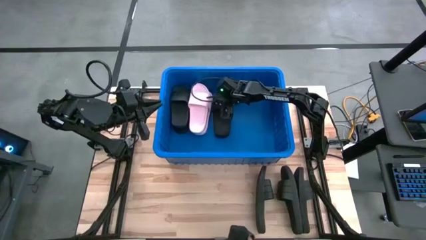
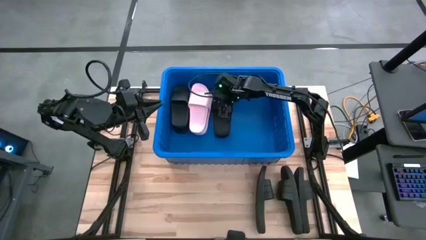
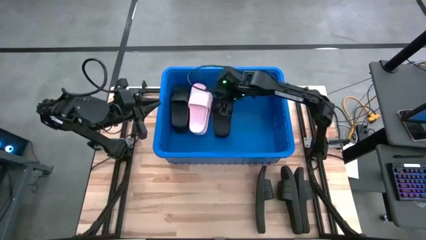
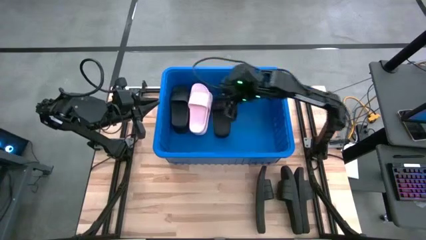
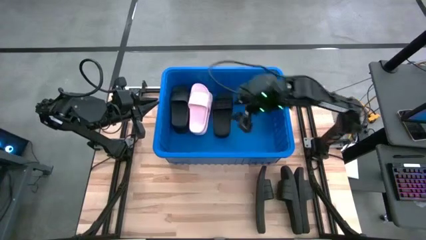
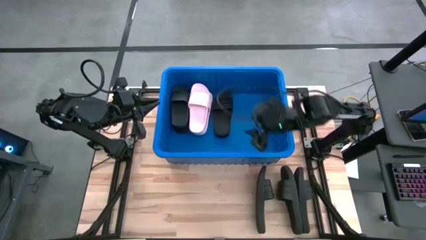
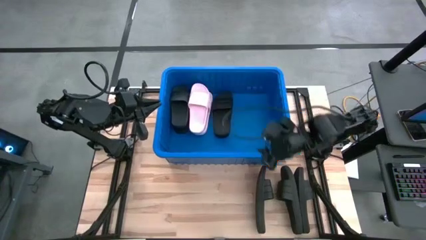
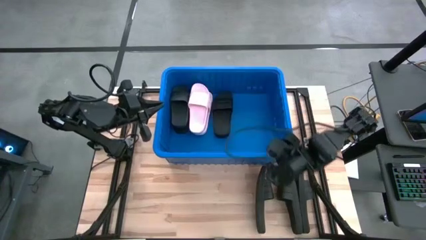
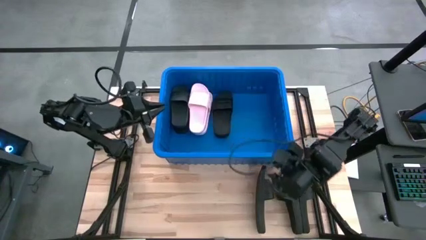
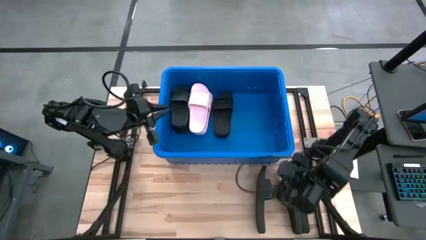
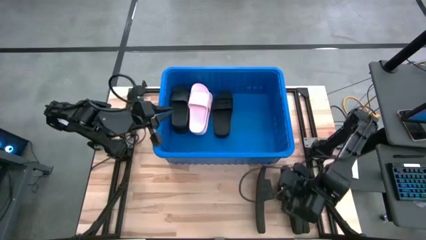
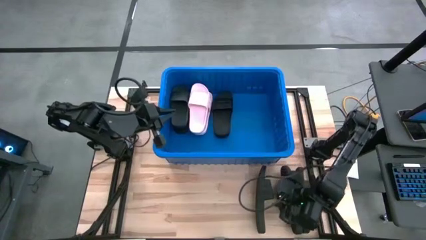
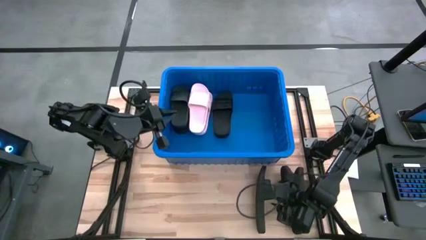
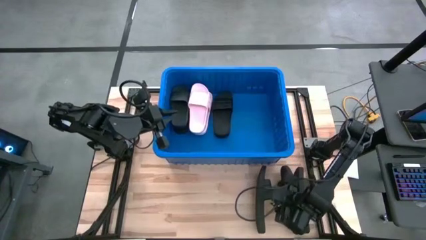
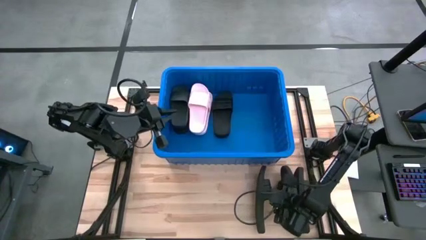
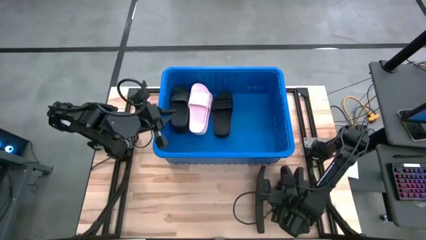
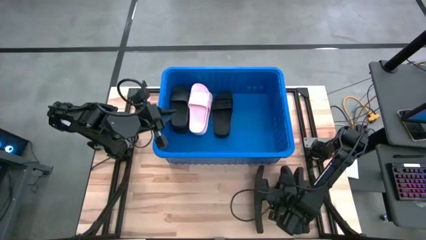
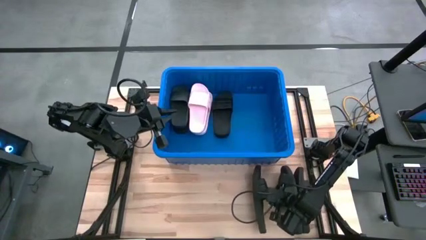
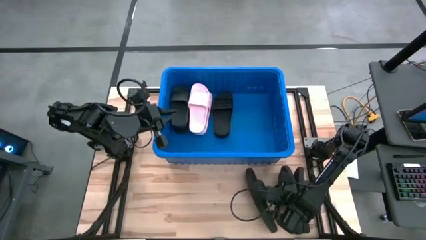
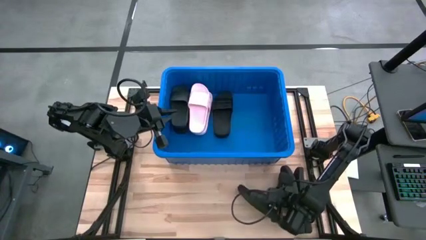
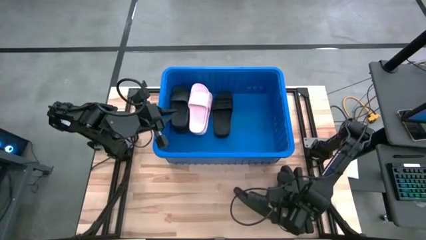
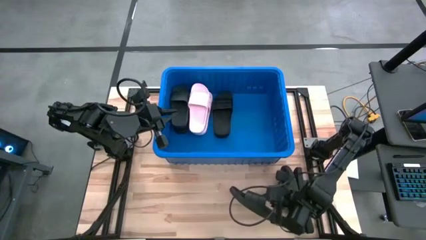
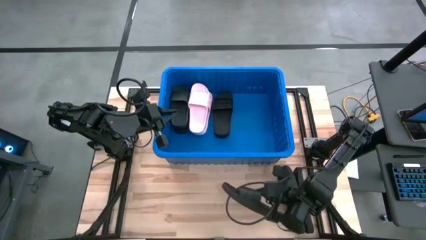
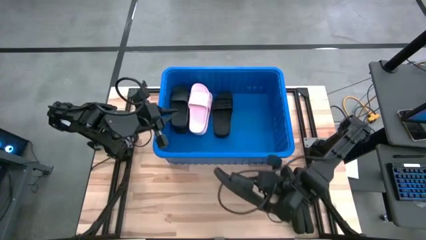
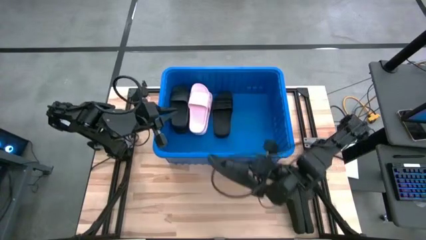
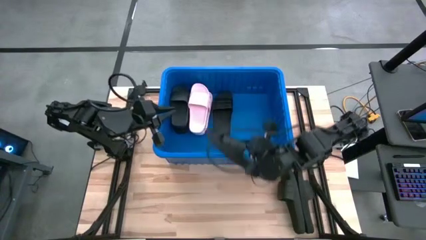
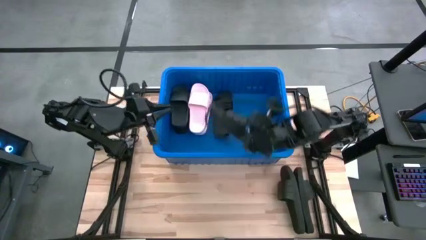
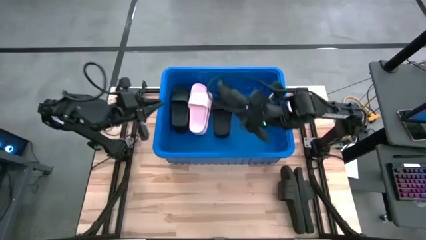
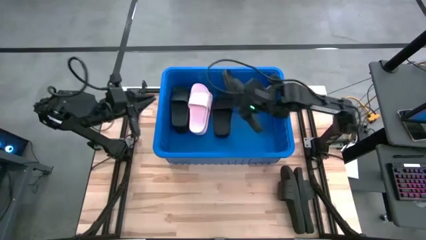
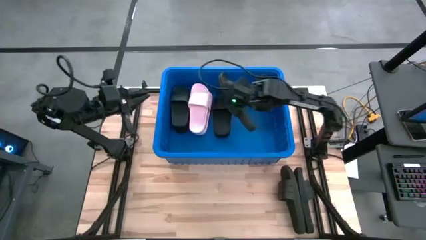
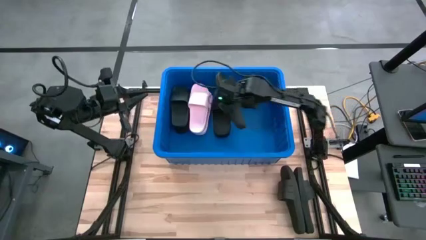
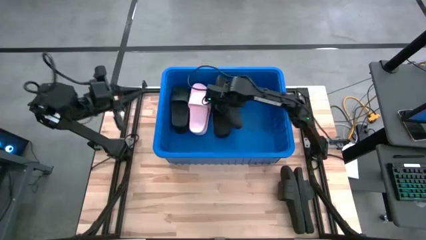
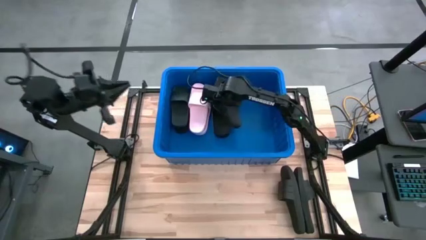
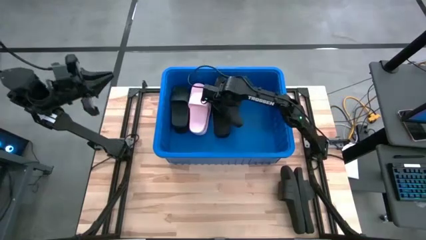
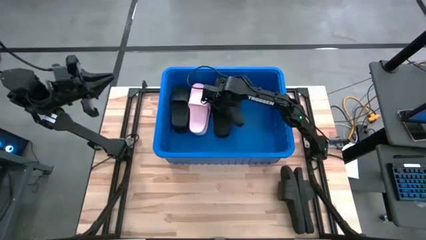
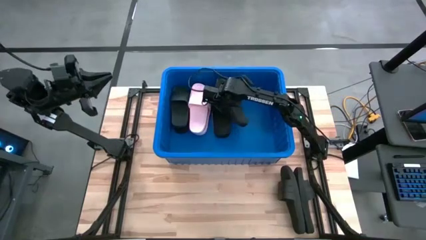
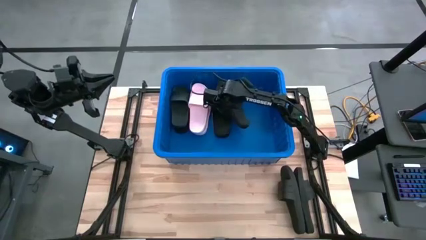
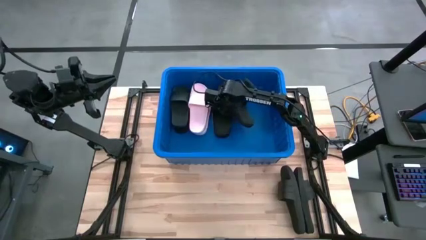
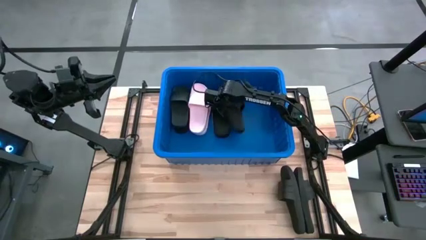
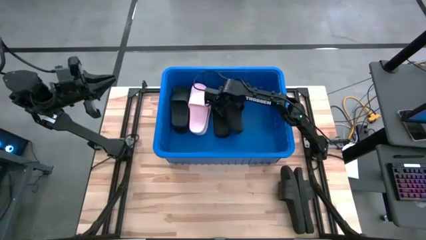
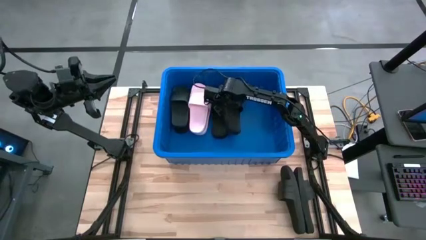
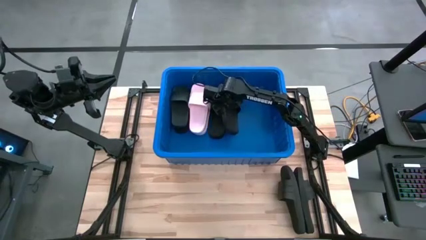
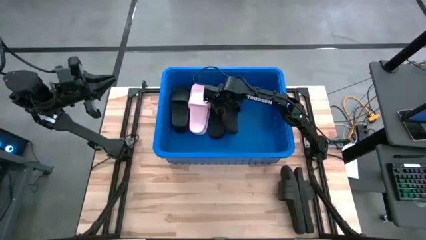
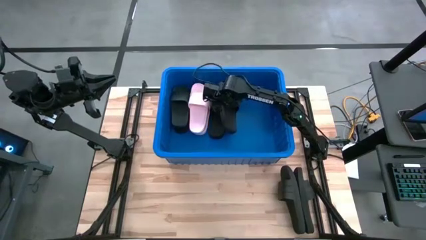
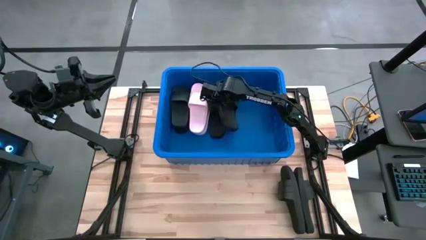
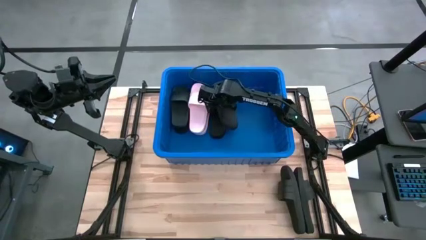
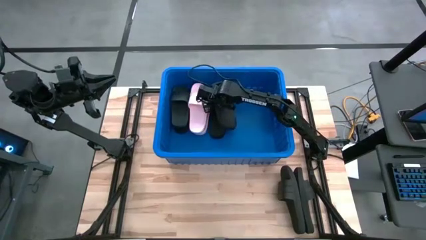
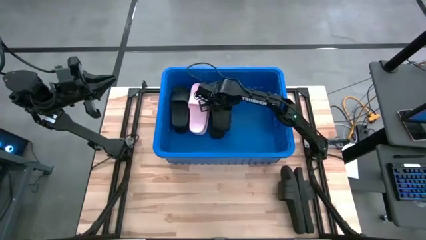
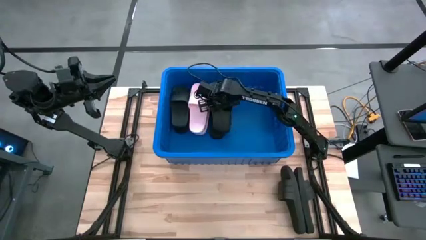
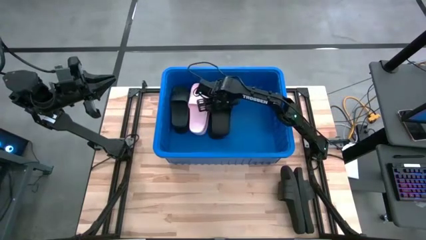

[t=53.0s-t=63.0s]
Task: Pick and place slides into bin
Put the black slipper into the blue container
